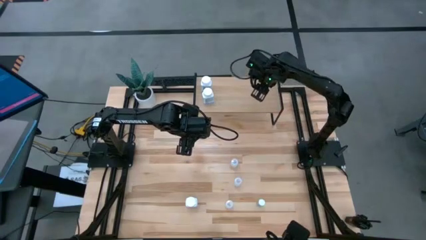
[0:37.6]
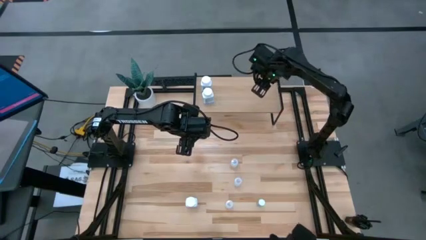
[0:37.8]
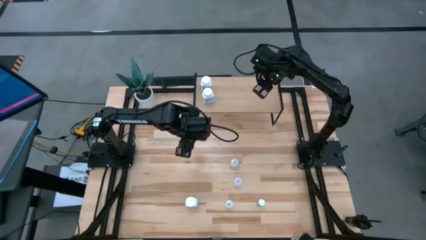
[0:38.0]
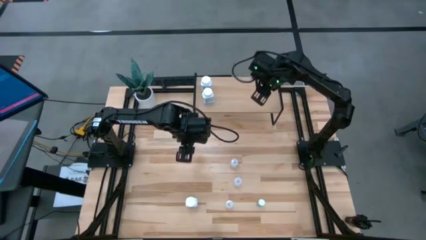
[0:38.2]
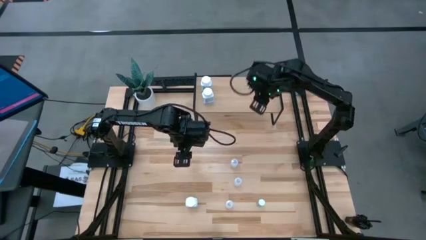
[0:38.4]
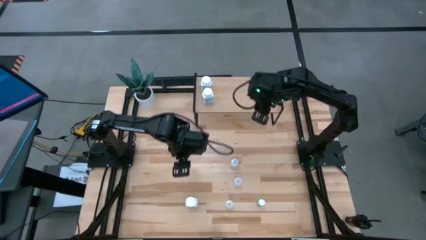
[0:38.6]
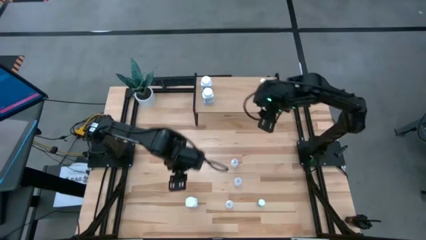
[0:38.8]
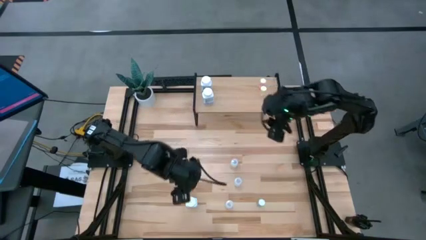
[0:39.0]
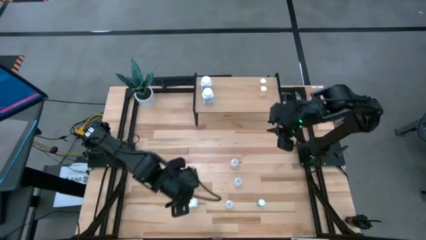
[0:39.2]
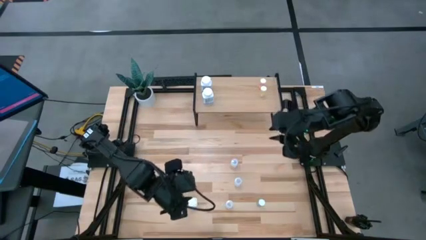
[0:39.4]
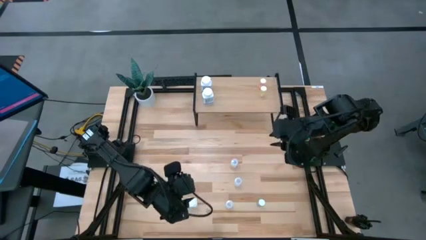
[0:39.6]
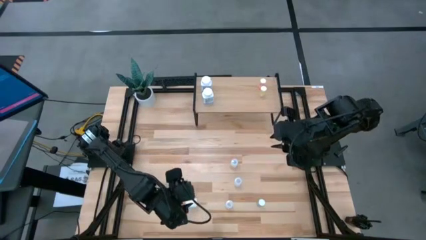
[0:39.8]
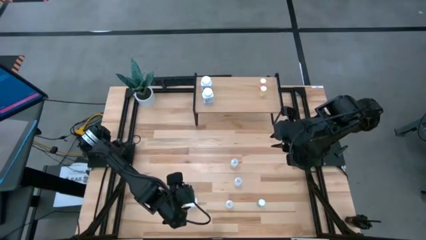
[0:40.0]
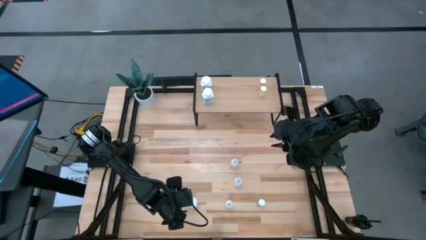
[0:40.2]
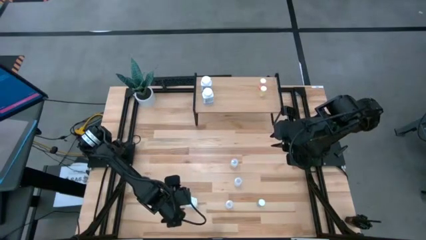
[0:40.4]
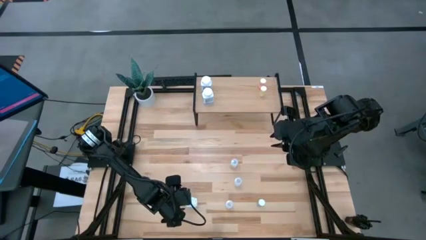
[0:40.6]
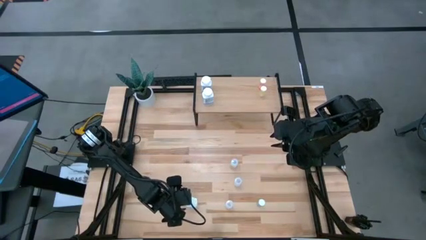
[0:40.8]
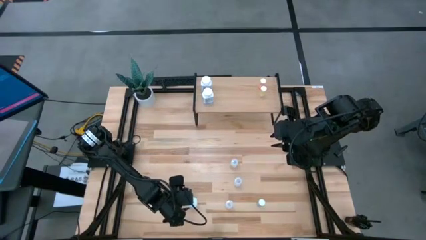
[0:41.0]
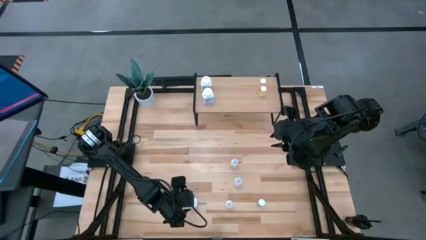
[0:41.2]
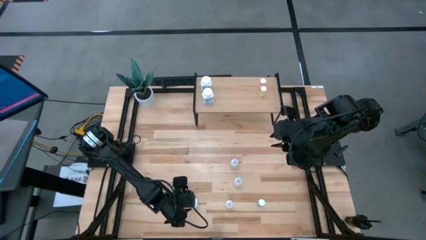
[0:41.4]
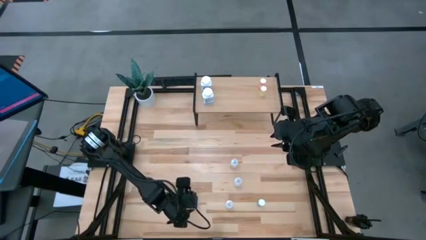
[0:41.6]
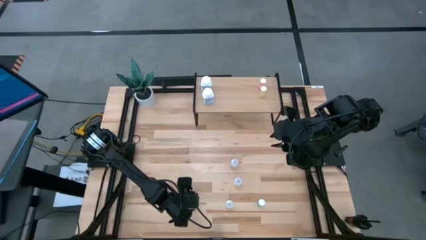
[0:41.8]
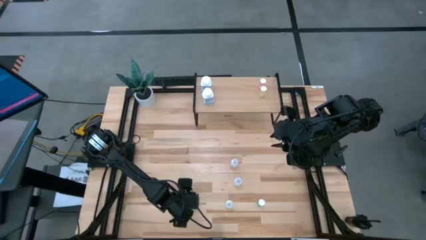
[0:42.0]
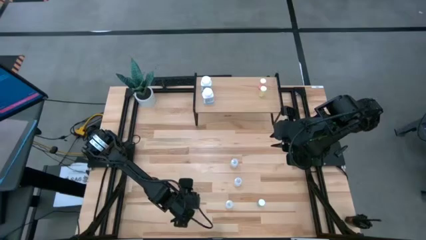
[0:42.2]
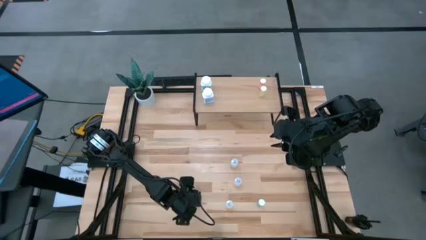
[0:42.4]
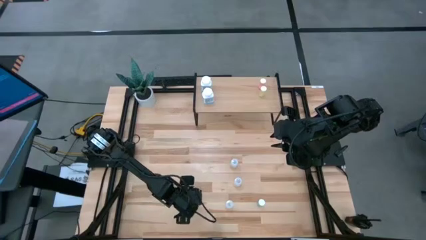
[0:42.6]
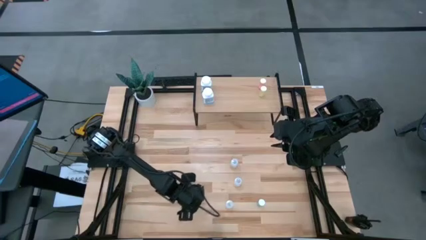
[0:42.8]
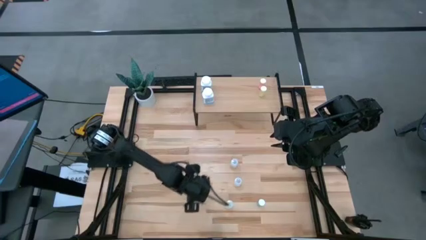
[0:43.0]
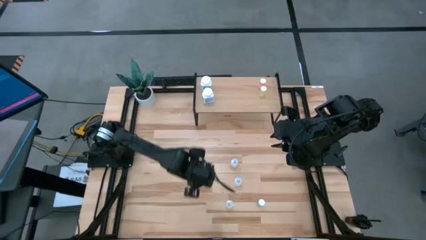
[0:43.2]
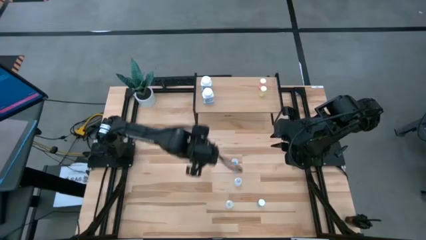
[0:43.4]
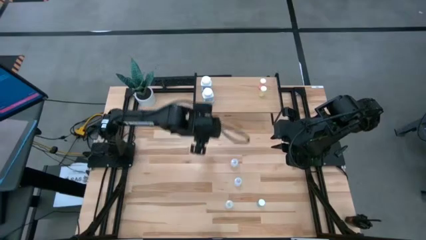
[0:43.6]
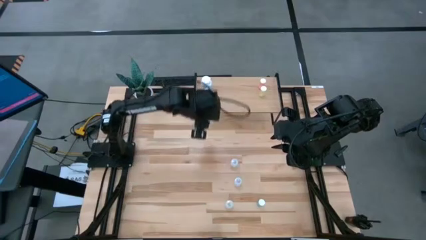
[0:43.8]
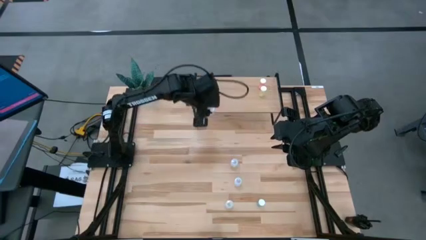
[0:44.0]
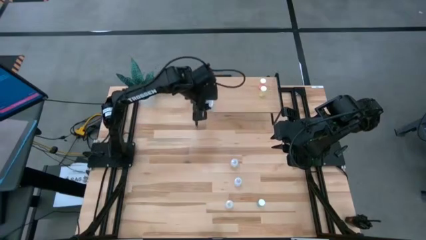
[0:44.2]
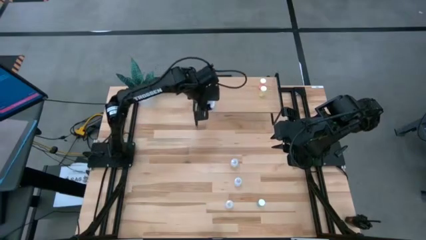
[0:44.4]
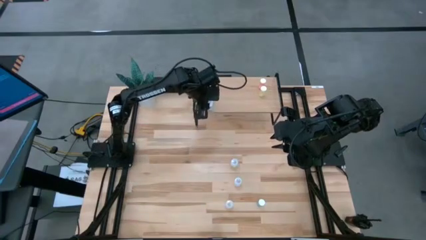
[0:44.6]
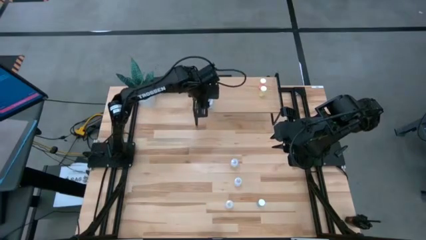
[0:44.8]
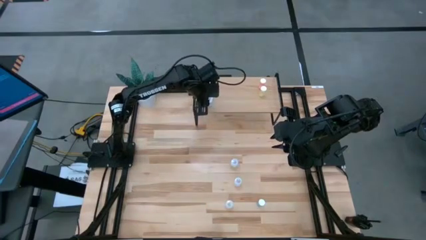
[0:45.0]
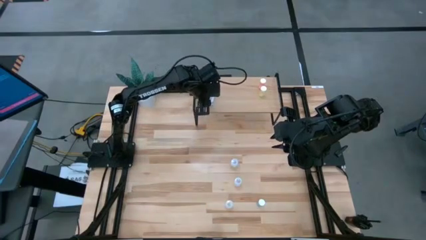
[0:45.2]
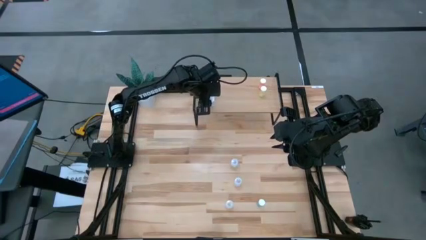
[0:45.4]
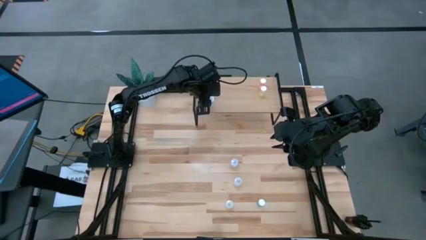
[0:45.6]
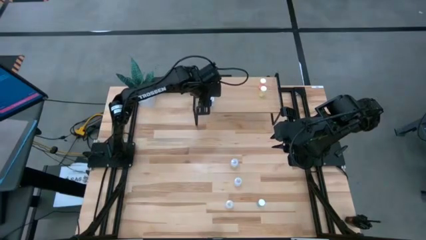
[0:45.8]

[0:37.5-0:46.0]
Task: Pick and place medicine bottles onto shelf by color
Put the white pill bottle on the shelf aligned with the other white pill bottle on the shelf

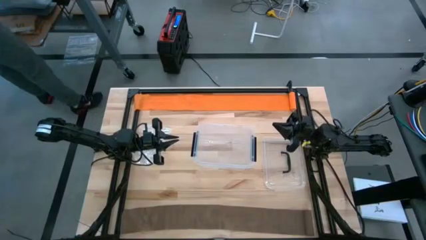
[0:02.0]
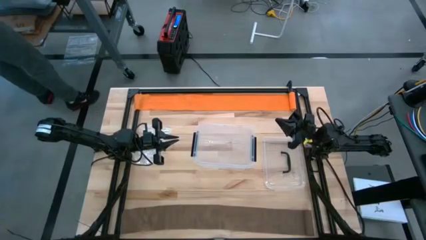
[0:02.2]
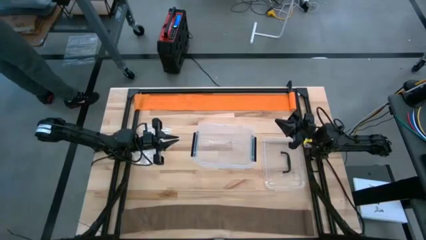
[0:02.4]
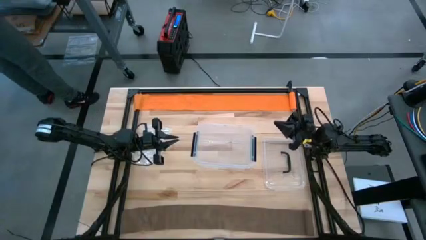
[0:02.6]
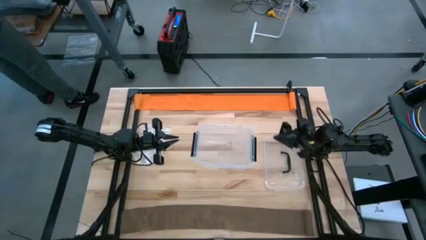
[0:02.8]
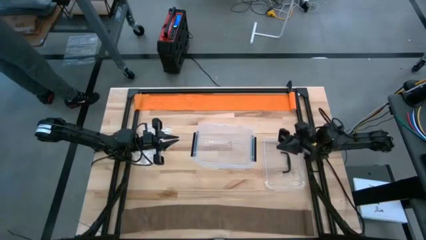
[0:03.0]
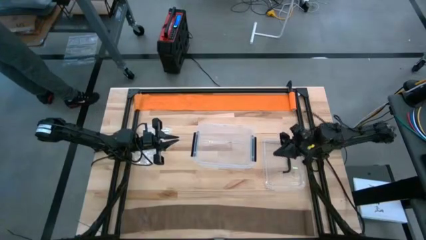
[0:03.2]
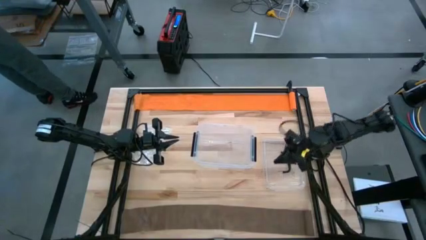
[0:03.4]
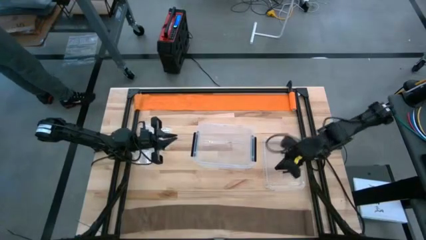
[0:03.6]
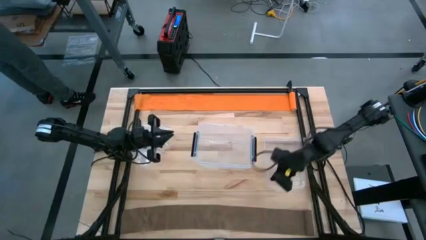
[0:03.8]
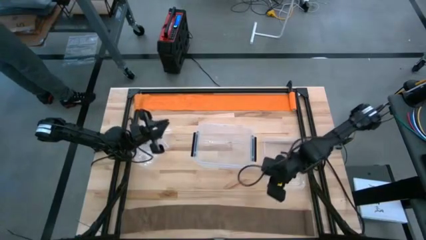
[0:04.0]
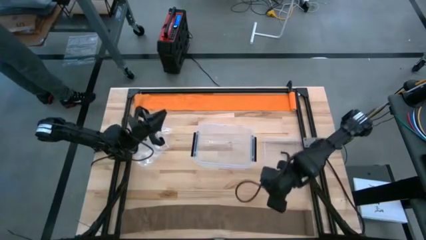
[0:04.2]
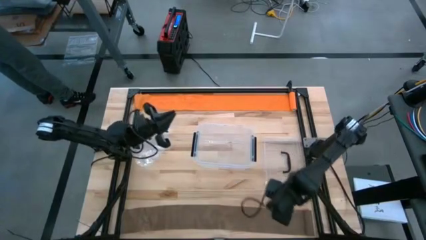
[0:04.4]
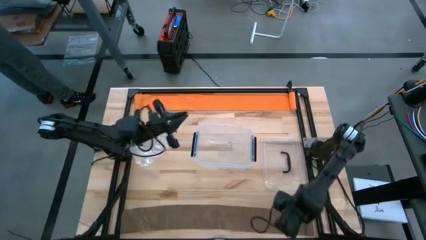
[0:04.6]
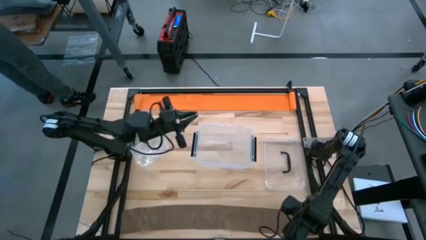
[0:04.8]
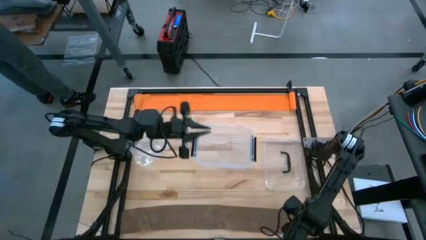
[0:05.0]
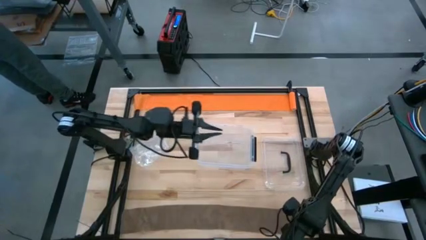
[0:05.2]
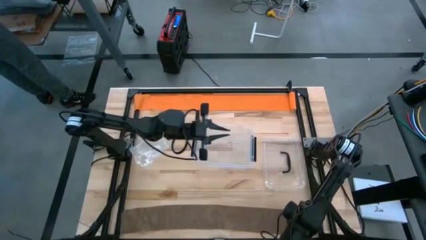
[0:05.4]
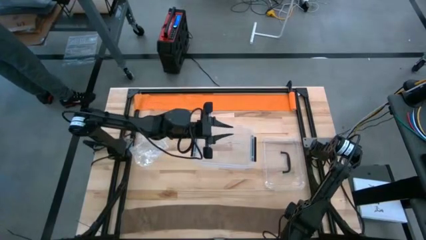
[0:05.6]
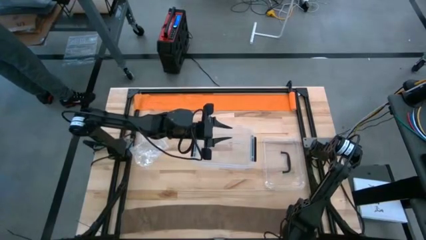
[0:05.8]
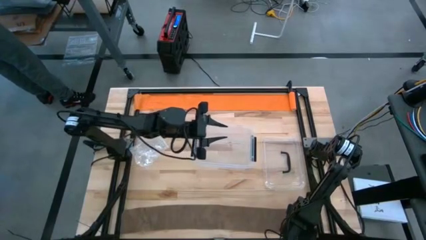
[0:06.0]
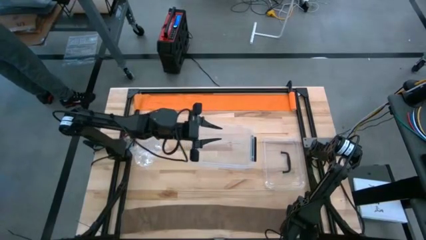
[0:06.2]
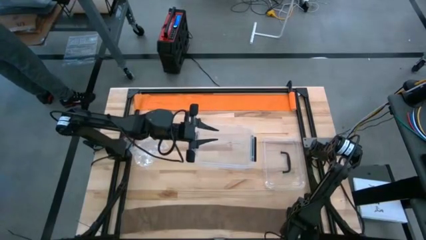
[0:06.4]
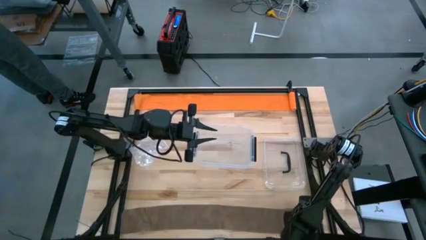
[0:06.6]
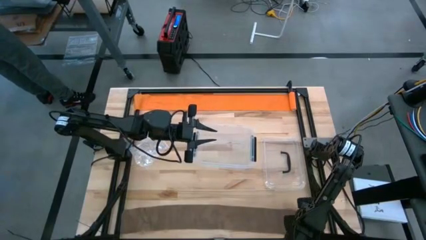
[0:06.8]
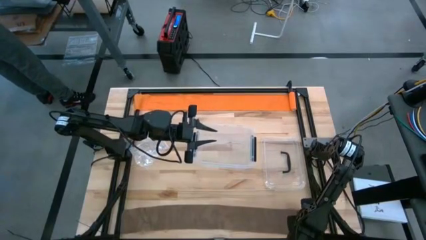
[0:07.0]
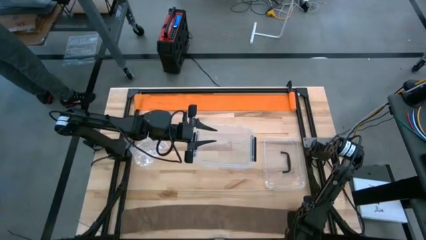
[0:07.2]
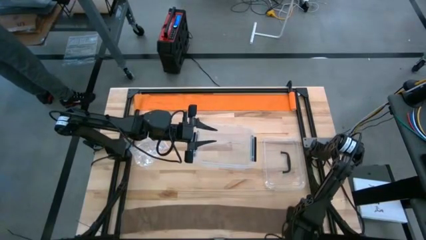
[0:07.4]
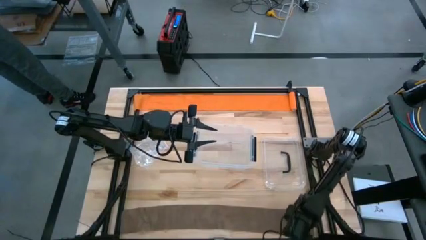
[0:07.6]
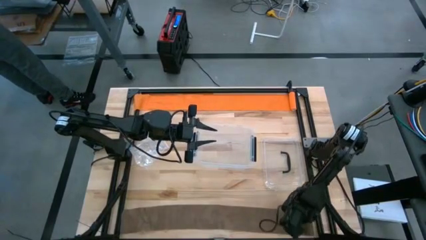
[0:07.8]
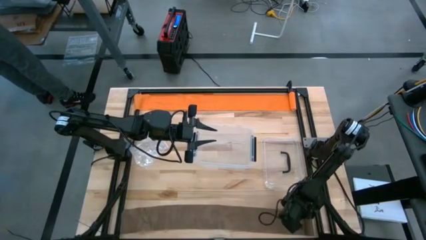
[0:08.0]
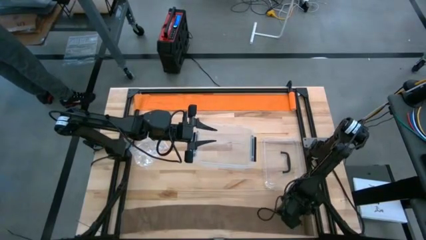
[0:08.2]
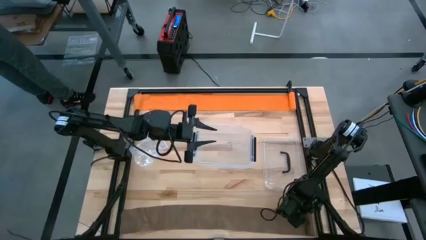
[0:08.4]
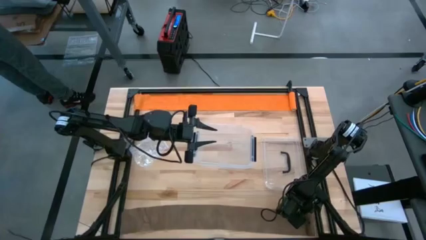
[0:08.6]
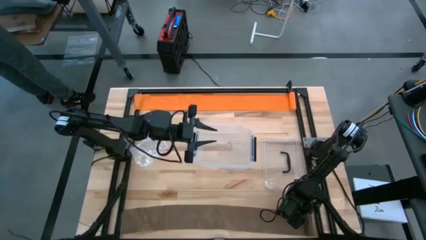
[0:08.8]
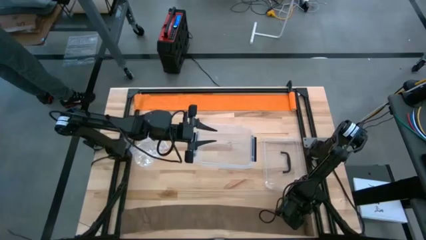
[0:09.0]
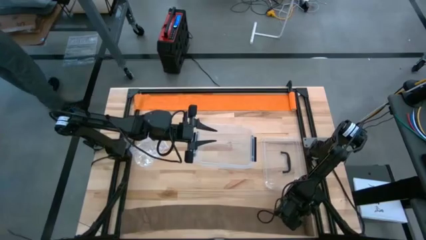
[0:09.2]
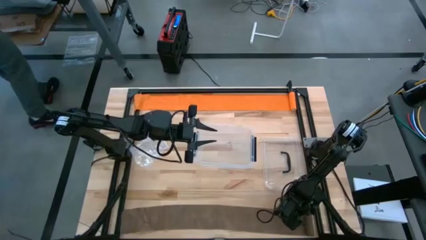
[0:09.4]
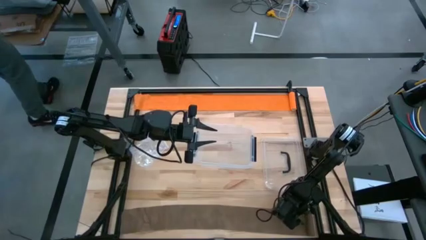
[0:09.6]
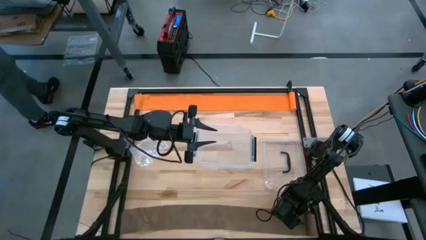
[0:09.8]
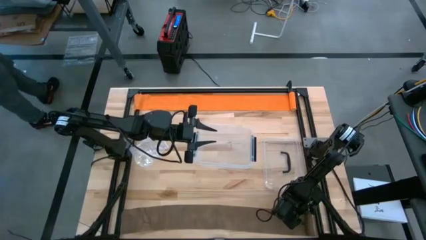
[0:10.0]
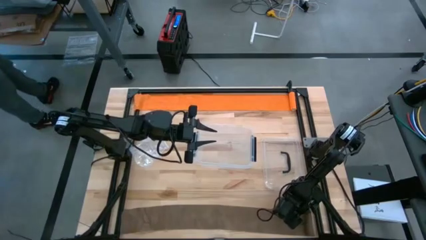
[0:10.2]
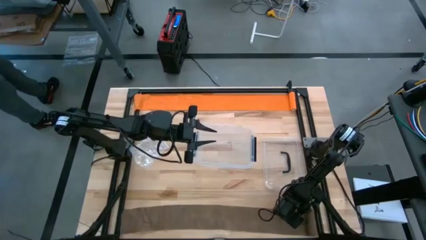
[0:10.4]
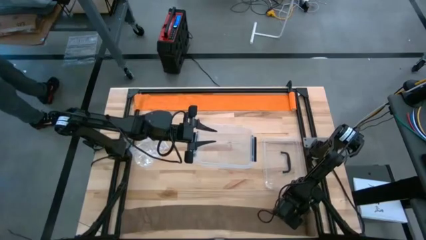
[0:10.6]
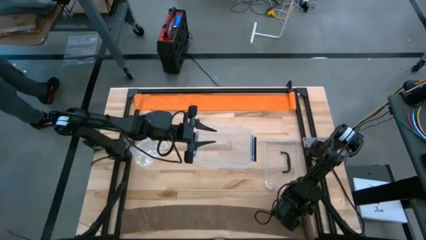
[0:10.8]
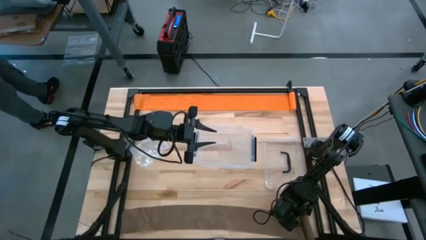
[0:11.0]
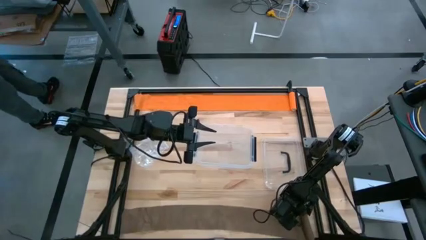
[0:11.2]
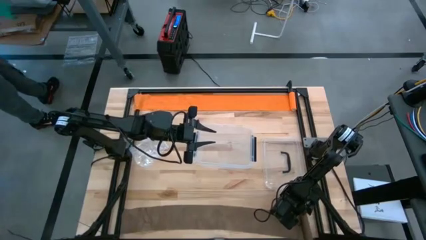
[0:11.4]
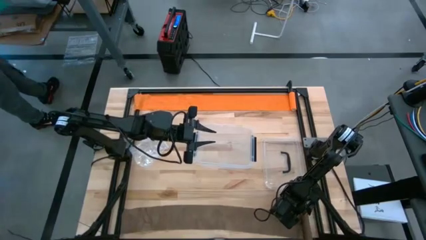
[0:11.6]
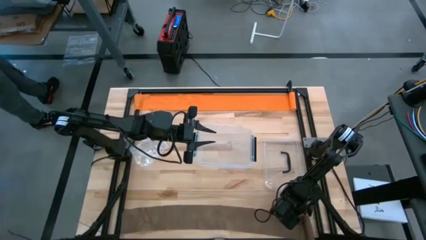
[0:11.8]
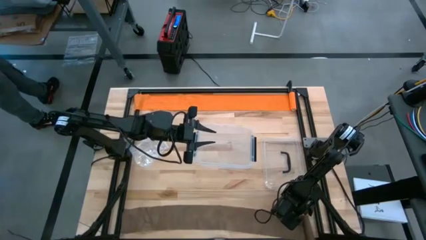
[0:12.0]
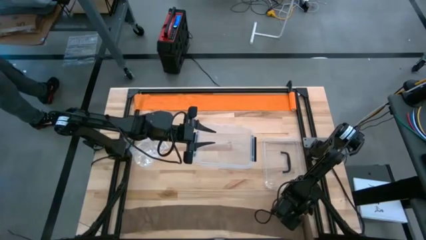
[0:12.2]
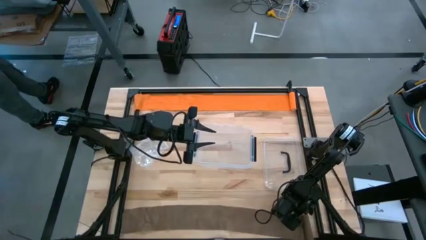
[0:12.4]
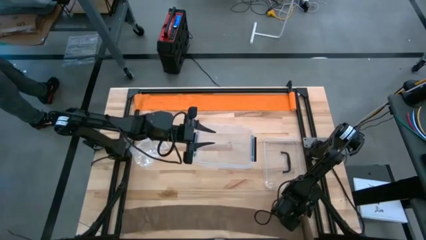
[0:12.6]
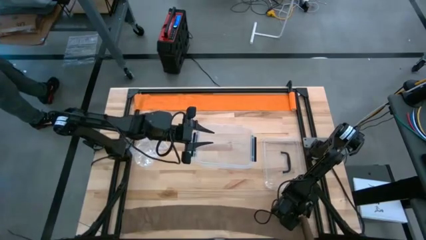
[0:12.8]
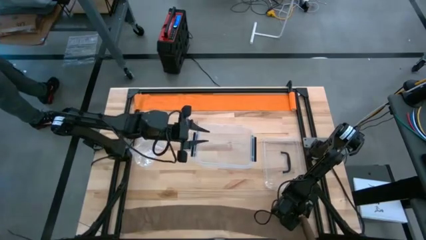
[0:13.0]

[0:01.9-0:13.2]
Task: Roll bandage
Roll the brown bandage
